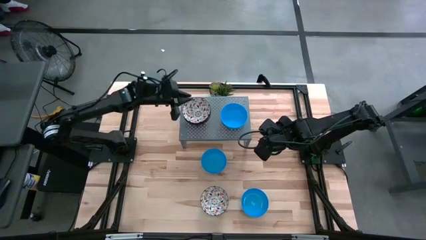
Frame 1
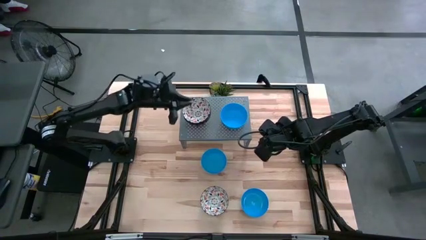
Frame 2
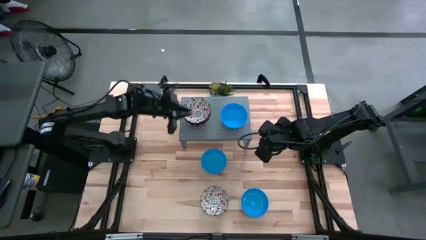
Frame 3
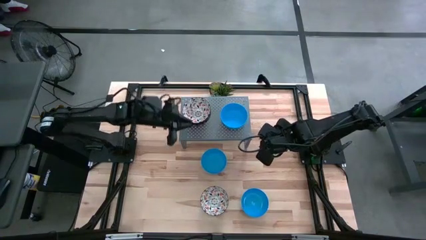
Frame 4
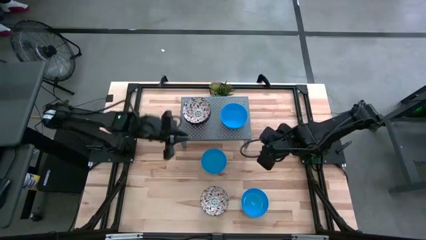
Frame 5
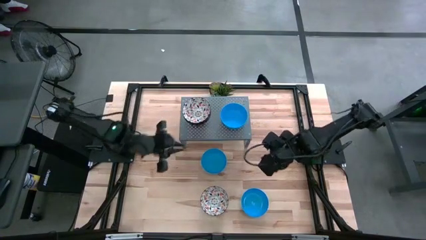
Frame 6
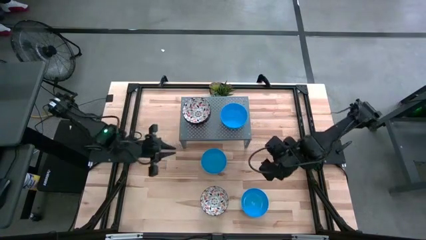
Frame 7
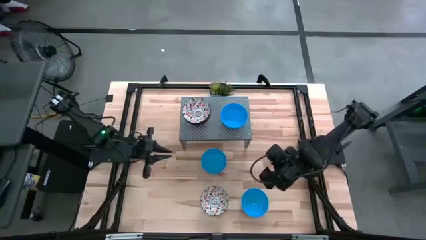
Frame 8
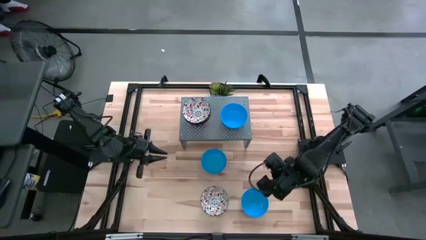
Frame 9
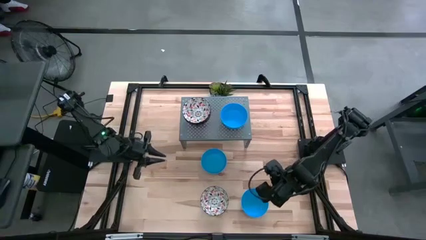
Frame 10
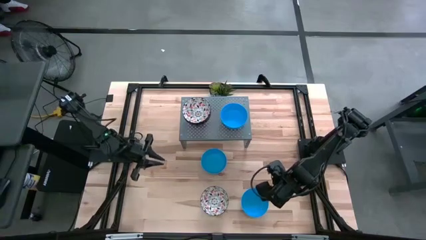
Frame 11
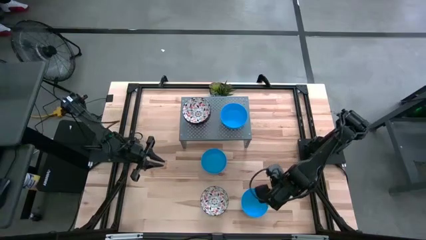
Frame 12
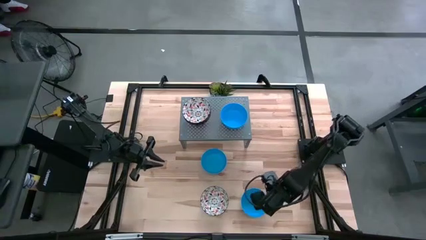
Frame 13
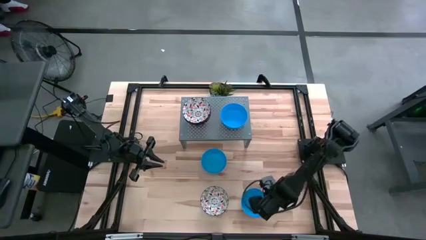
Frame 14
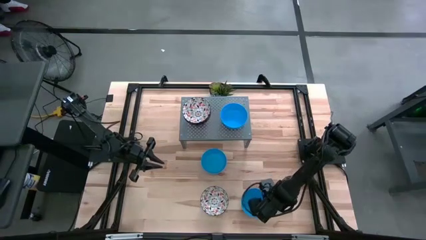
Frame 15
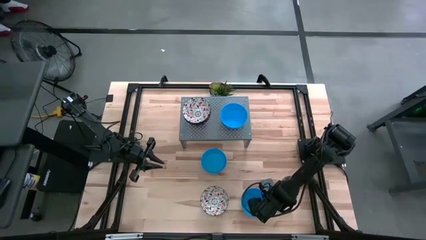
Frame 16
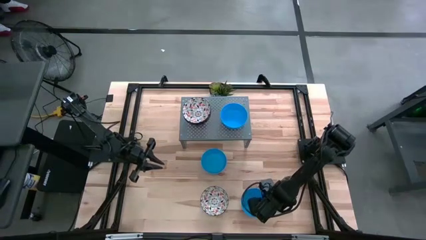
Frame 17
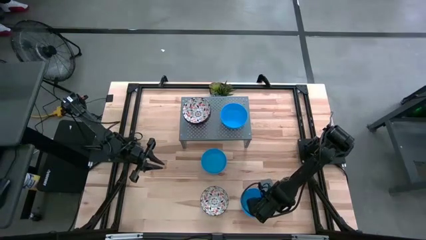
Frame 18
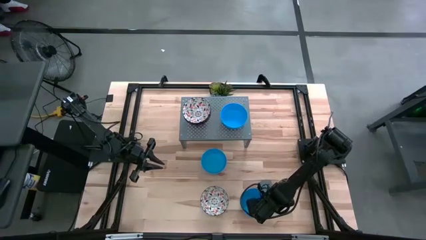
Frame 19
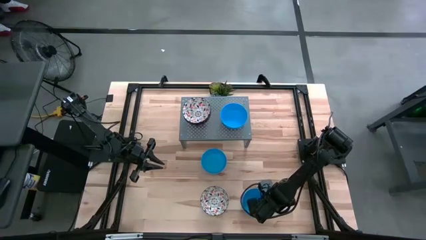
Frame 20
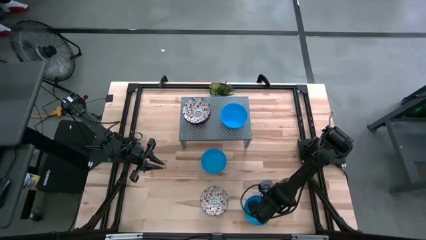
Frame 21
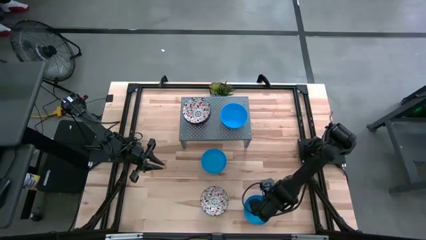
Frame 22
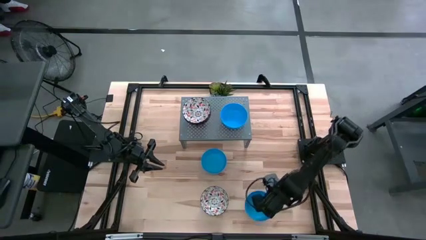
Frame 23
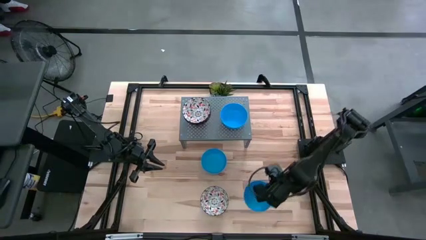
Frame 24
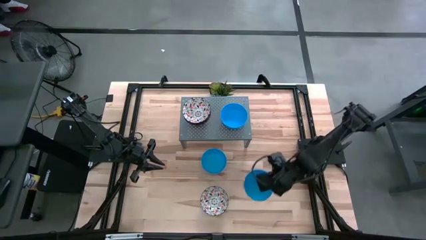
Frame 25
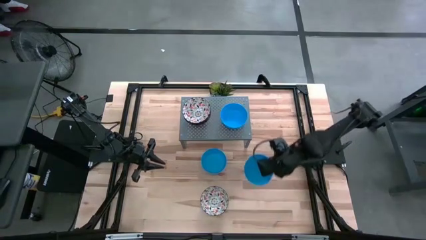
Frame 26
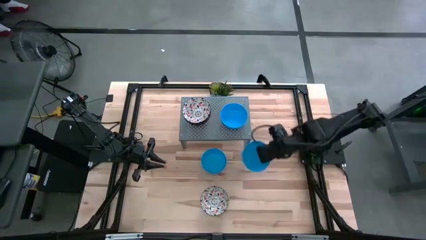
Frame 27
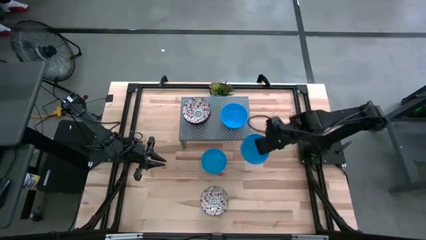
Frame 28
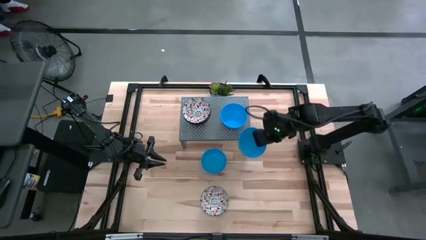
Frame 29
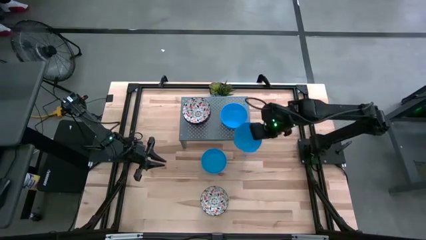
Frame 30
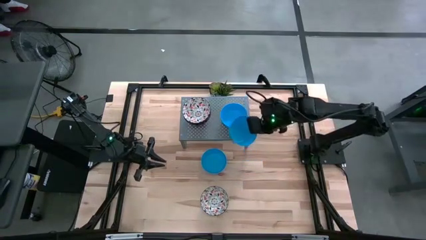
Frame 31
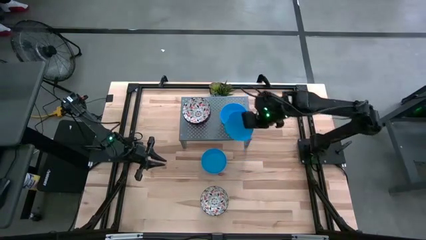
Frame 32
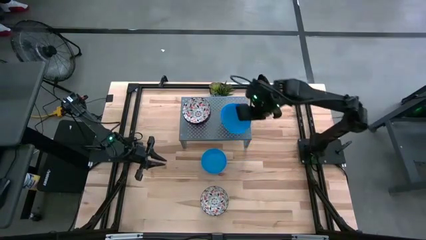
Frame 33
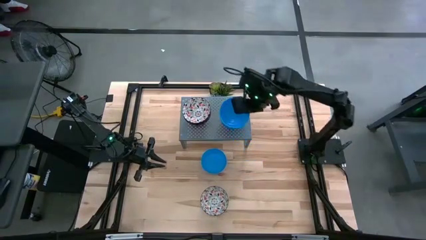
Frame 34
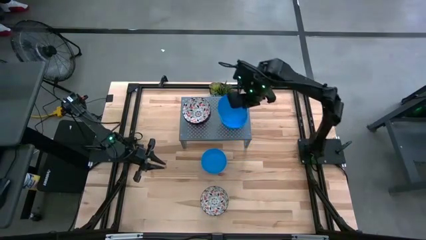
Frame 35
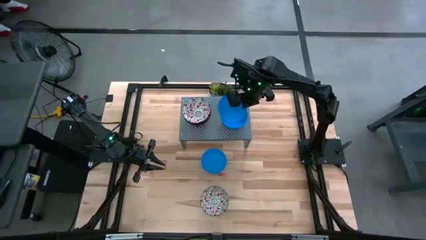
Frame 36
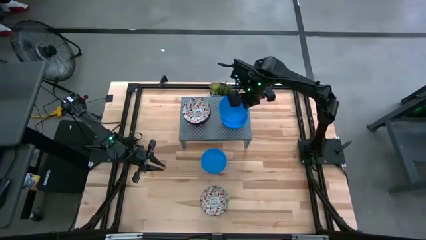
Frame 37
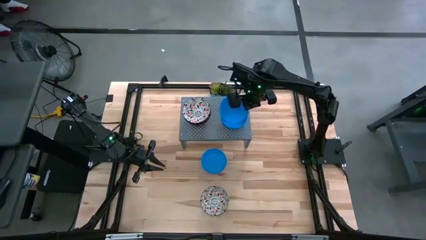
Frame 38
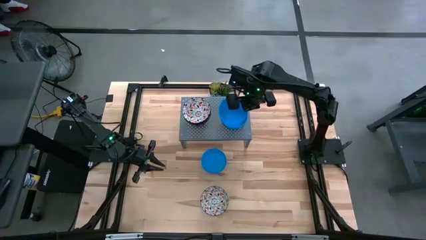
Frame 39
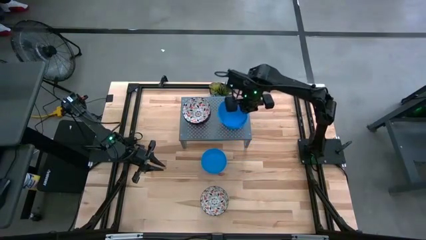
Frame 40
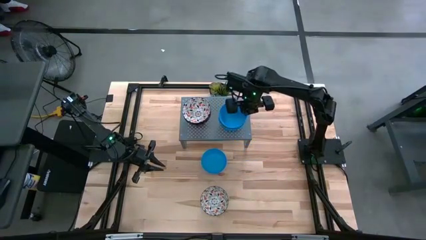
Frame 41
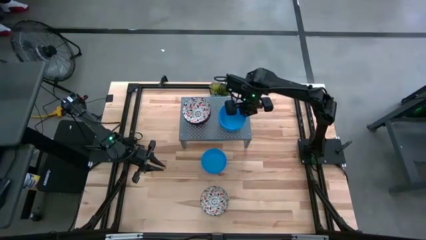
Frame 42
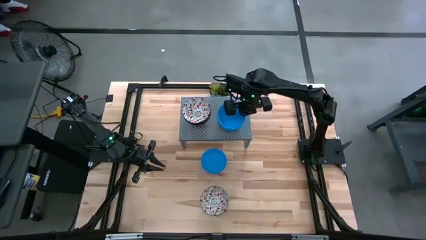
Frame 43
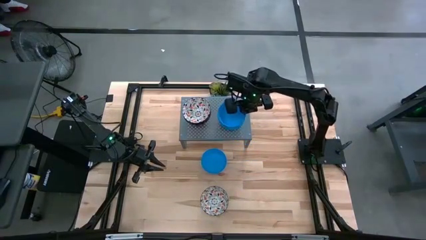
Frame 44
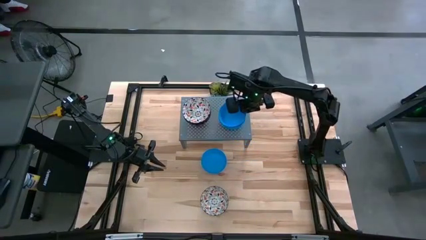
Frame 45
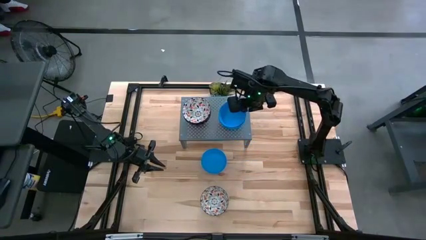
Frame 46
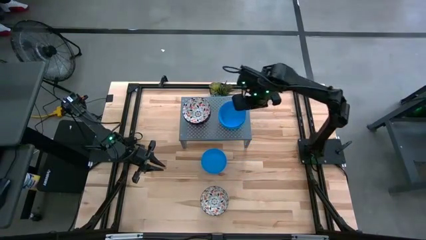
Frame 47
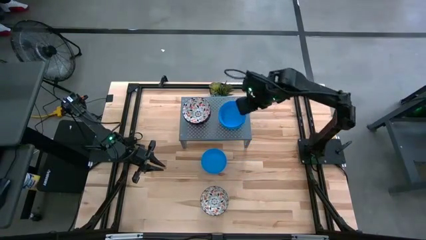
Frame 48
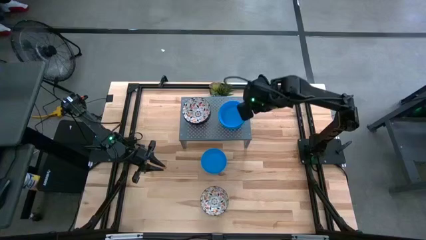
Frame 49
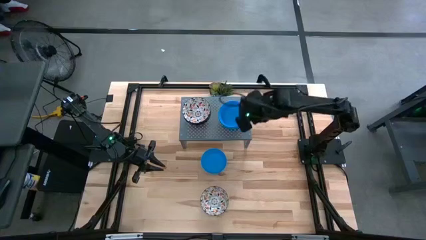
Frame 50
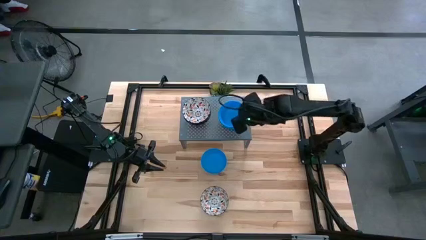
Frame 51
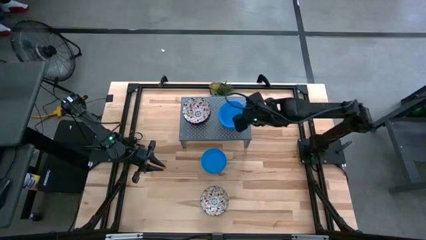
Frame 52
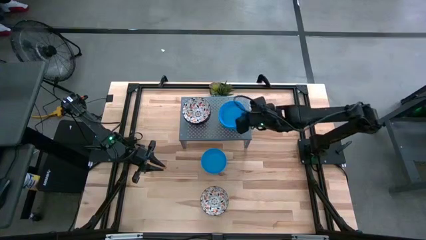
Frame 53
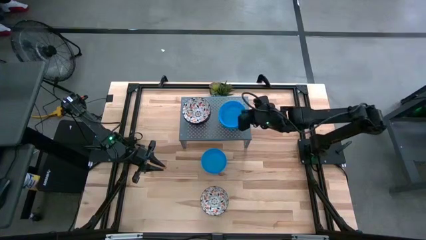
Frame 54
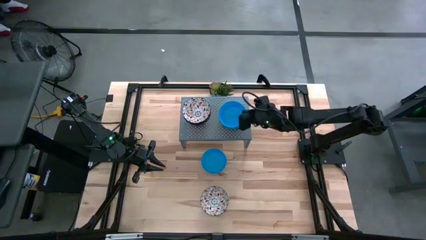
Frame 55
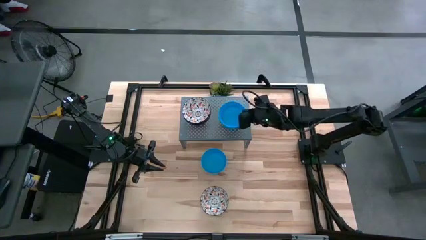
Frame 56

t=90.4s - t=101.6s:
Task: Pick & Place Mini bowls
Stack the blue bowl on the stacked blue bowls on the shelf

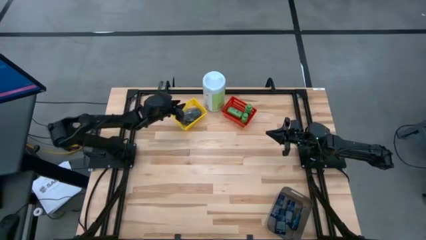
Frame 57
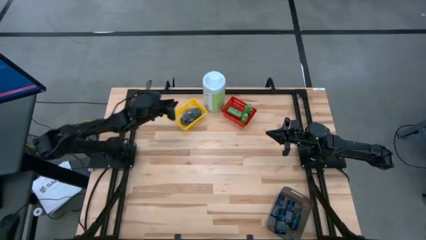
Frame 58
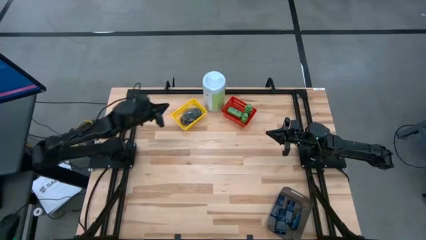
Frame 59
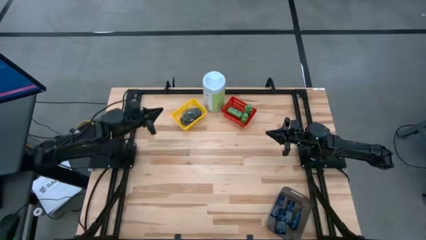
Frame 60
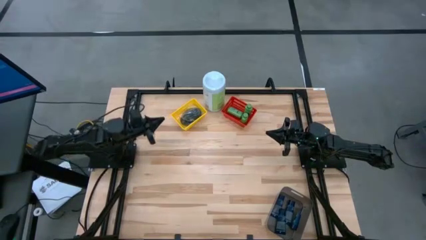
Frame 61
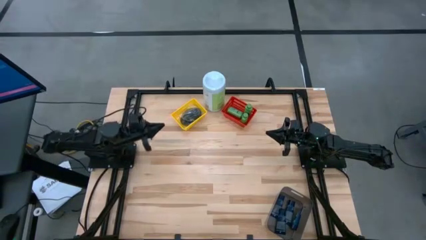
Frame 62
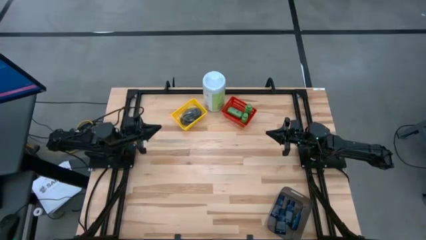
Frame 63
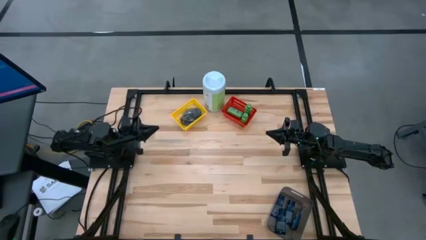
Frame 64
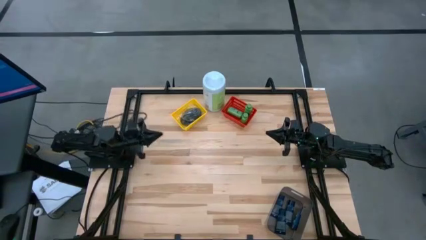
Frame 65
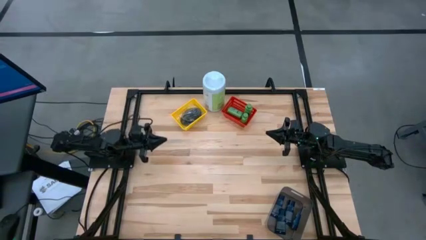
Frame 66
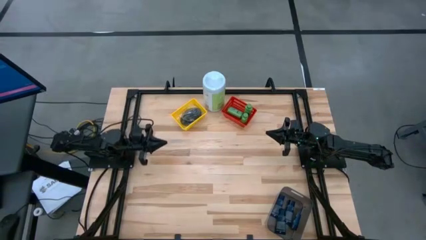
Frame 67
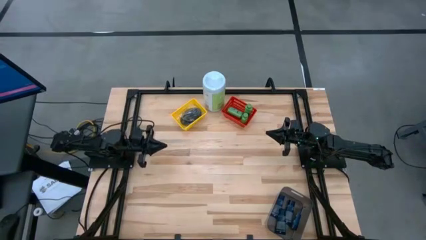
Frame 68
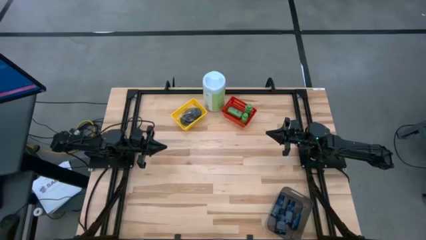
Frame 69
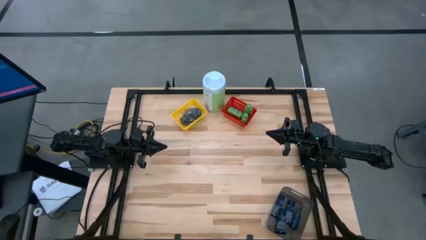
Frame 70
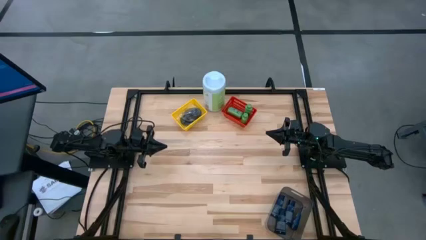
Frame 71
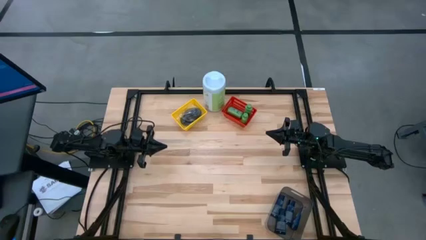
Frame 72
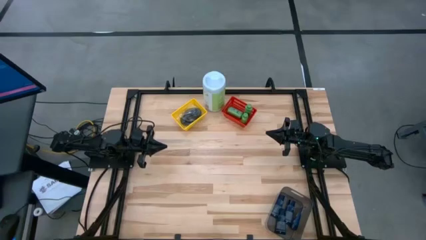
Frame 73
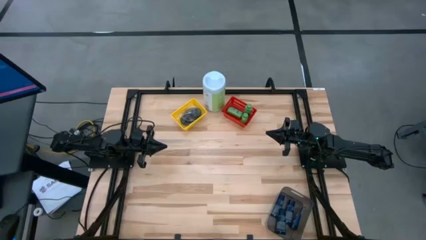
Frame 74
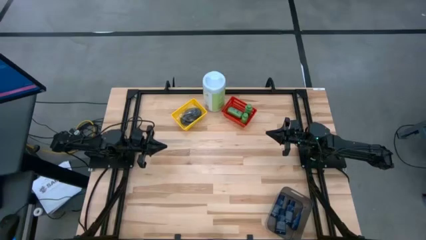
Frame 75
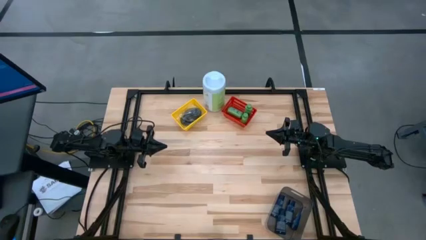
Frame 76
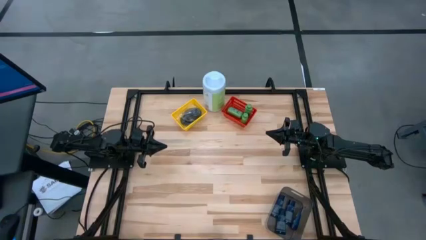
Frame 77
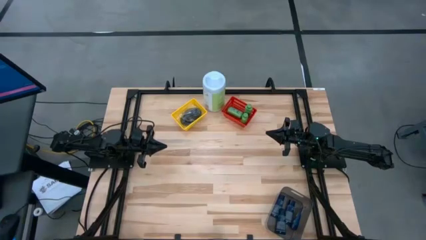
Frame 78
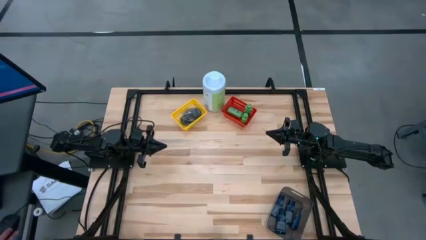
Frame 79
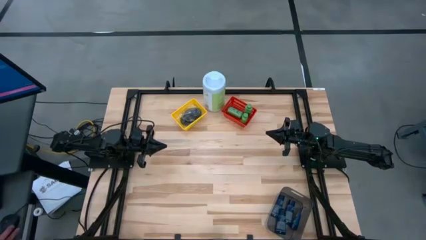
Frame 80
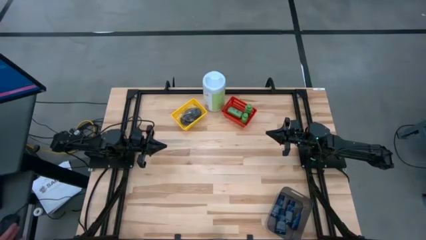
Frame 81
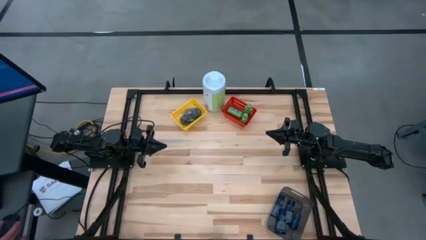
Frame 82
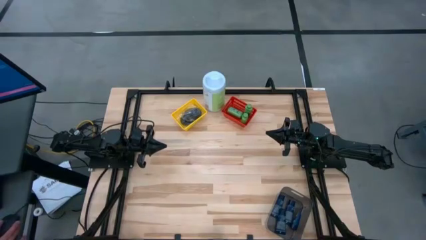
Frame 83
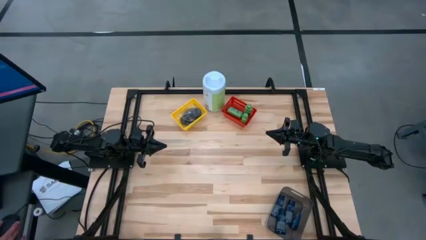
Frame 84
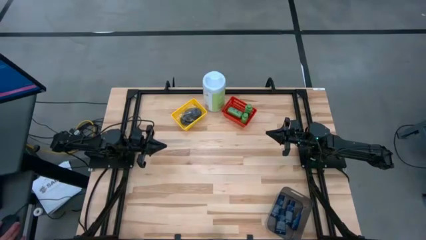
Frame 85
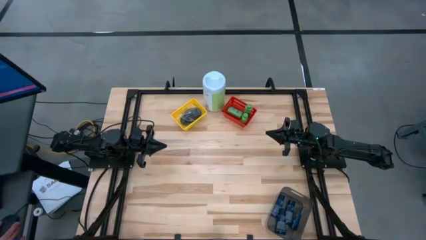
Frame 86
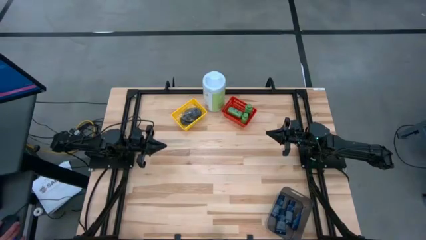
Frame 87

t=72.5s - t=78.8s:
Task: Pick & Place Travel size toiletries
Return to Home Position
